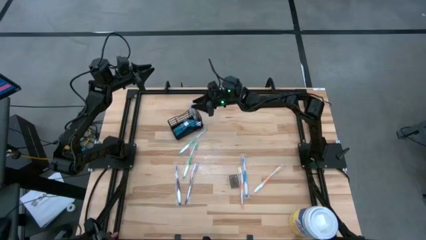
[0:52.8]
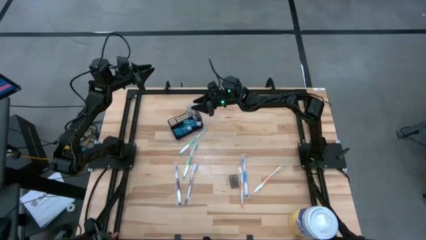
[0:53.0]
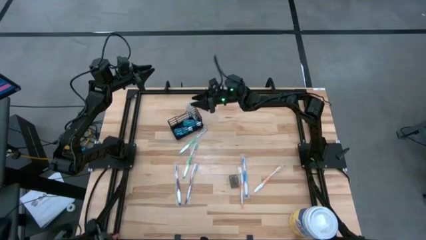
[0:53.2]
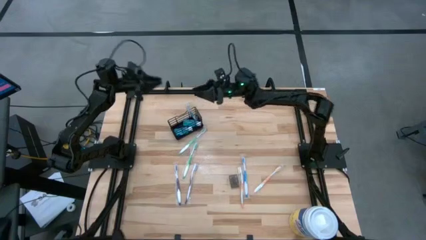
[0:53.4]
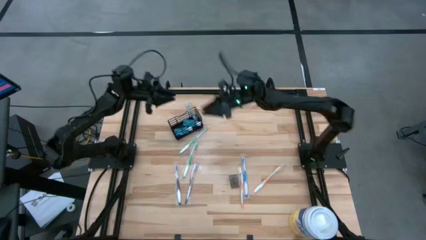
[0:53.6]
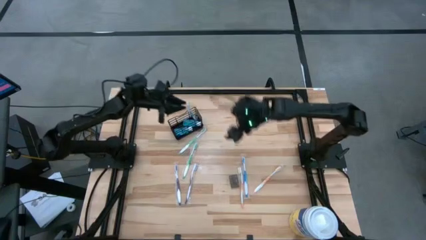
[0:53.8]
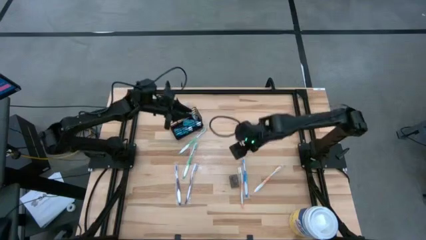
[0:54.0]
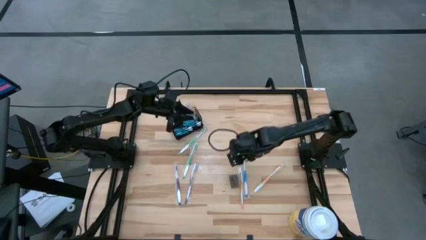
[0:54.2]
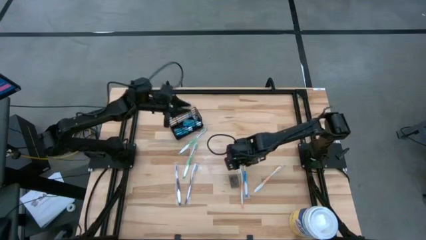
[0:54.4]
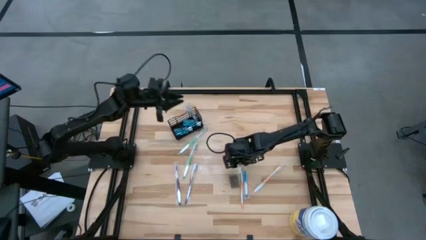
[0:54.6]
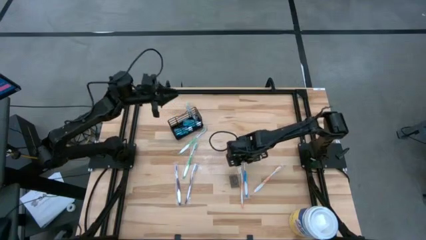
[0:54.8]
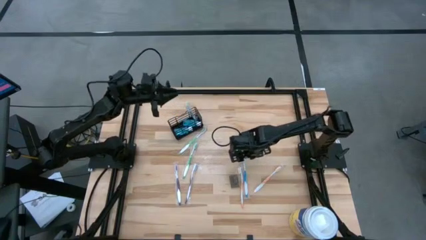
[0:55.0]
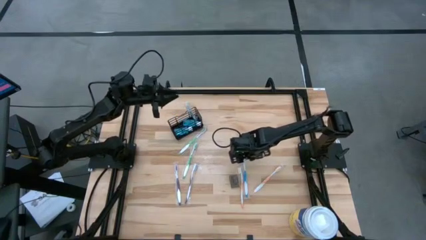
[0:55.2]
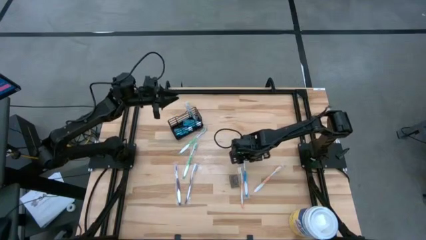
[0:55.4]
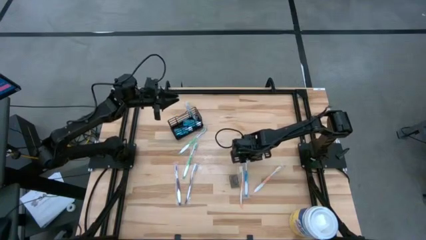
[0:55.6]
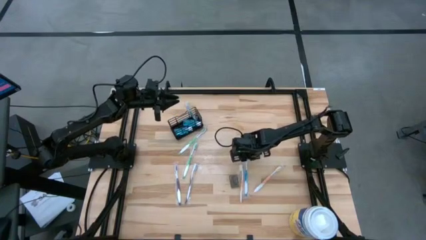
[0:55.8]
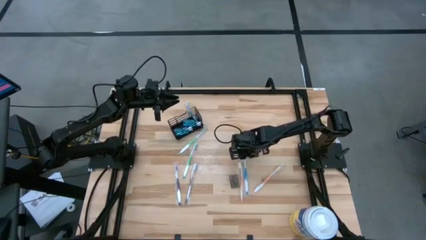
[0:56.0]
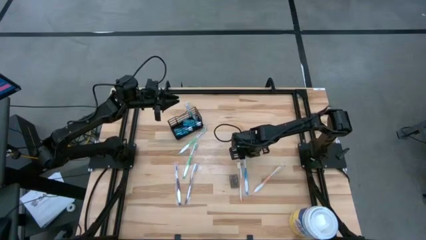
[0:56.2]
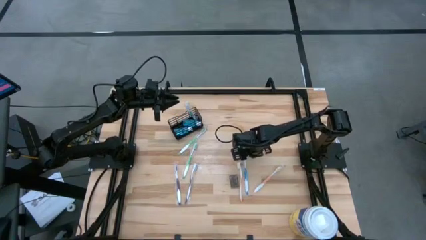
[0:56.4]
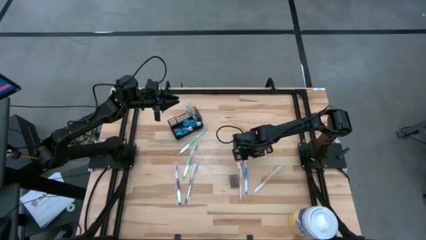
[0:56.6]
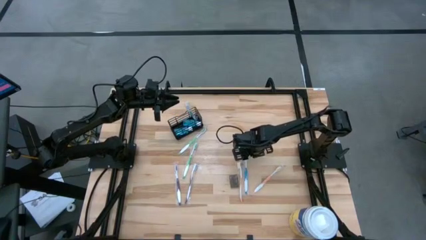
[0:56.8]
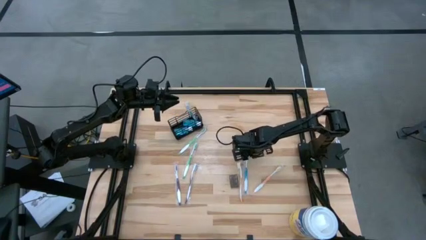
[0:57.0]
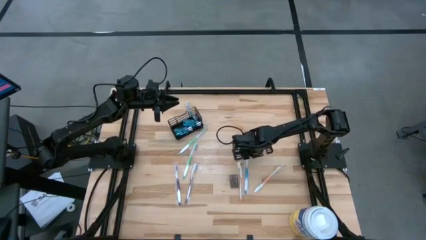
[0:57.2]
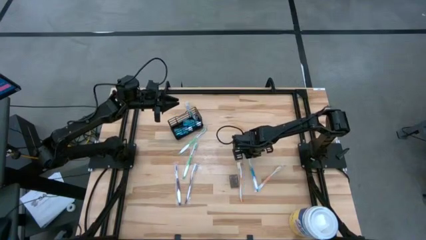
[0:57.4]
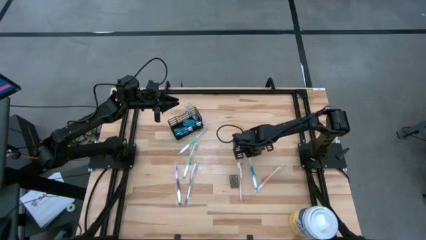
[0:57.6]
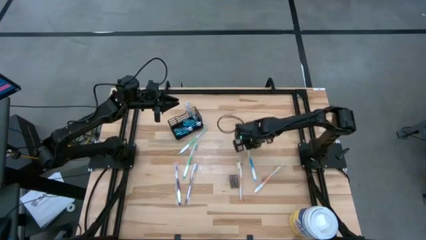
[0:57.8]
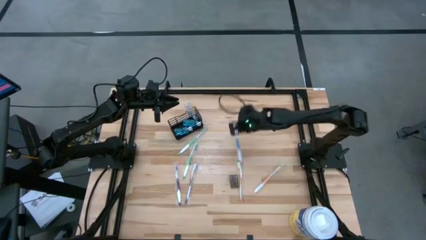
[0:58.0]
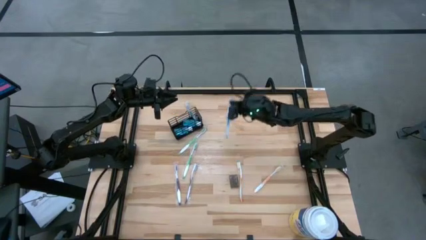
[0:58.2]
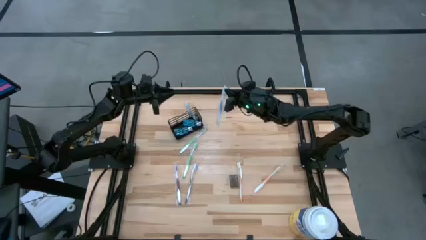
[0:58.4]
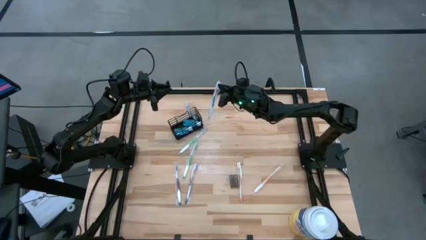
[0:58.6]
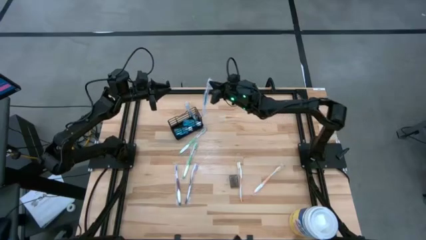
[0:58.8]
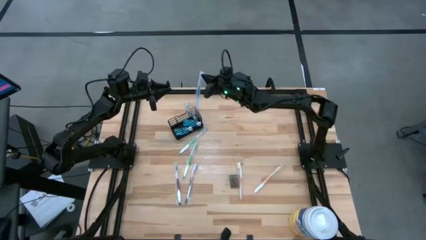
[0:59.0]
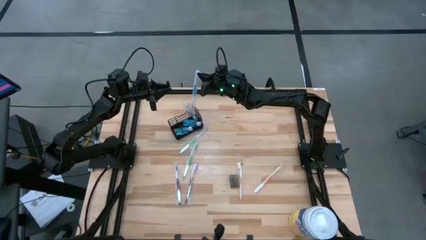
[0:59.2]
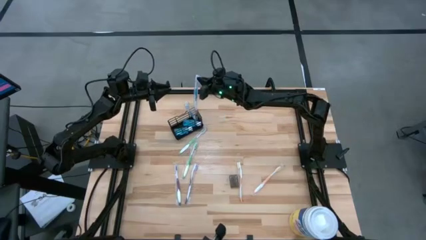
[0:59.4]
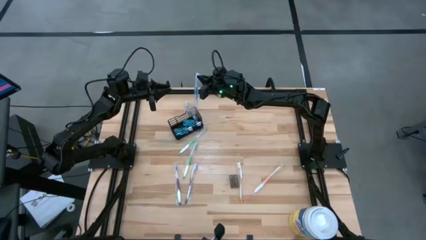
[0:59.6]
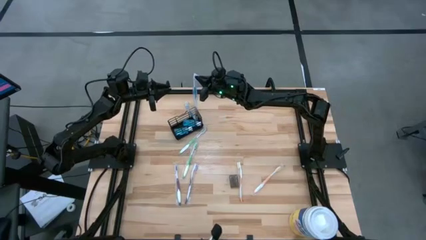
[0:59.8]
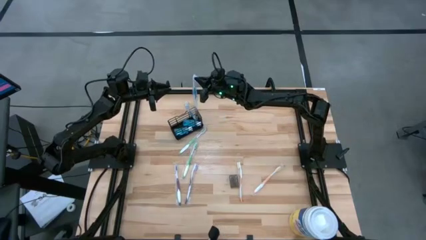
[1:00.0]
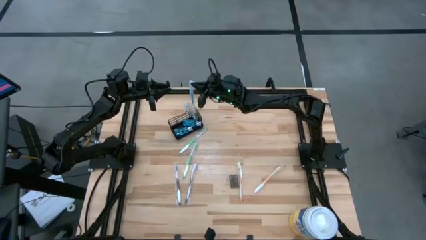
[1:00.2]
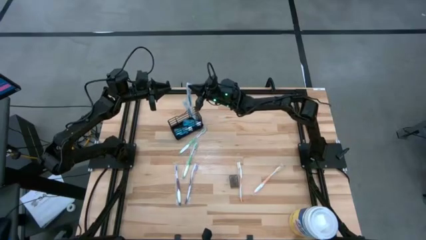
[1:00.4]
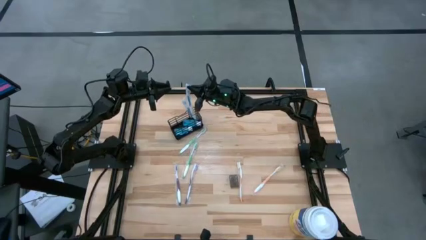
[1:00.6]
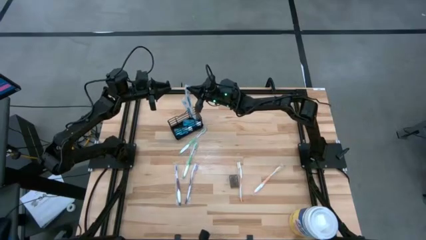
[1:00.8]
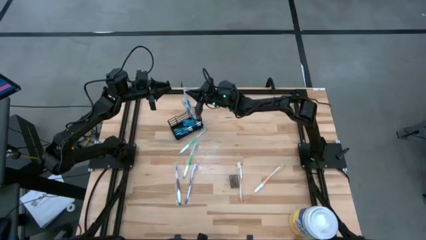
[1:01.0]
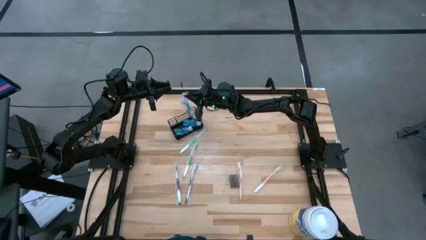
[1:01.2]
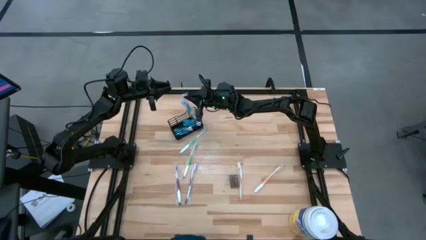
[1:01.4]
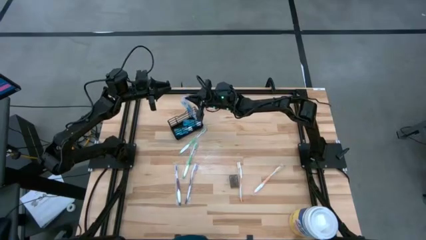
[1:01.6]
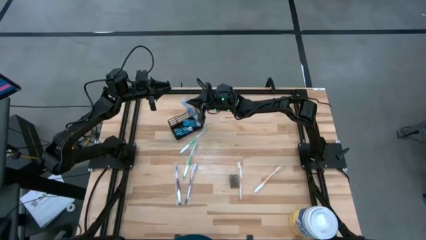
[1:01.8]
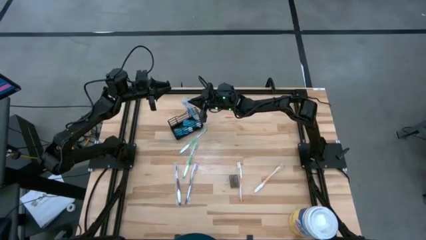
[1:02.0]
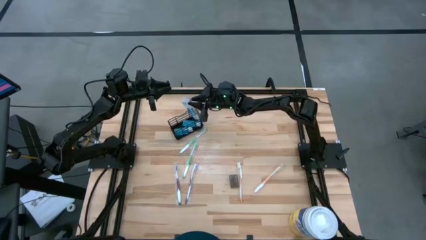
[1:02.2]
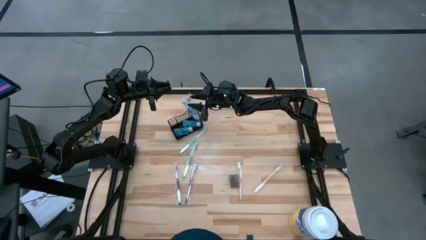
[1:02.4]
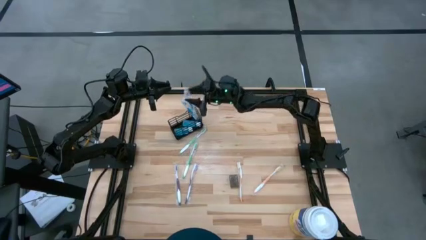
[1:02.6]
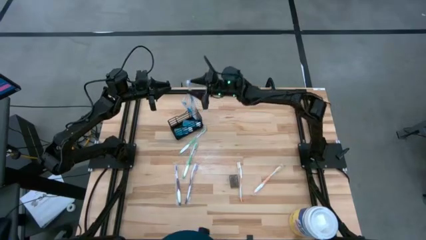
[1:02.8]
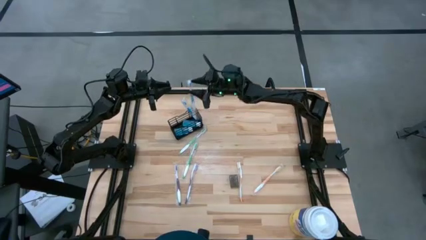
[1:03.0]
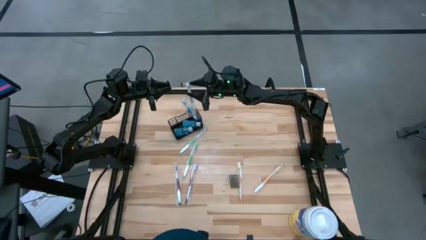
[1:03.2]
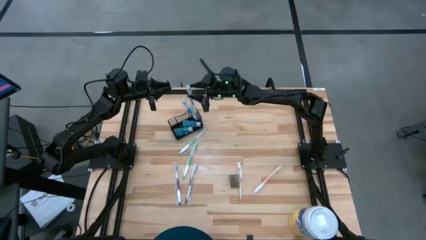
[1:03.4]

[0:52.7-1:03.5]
Task: Pick & Place toothbrushing station
Put the blue toothbrush into the black organizer

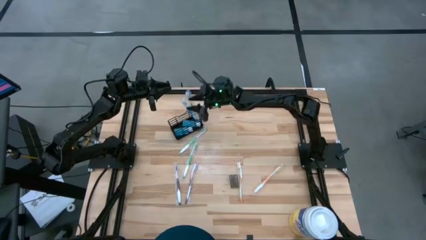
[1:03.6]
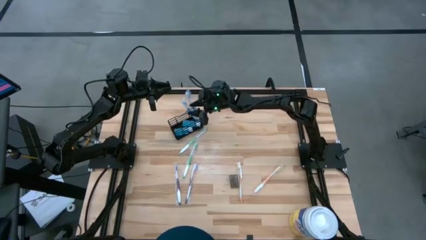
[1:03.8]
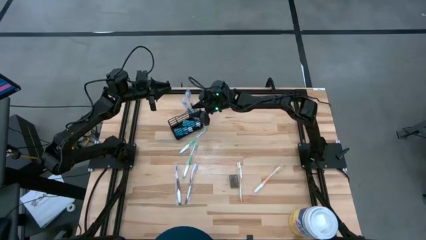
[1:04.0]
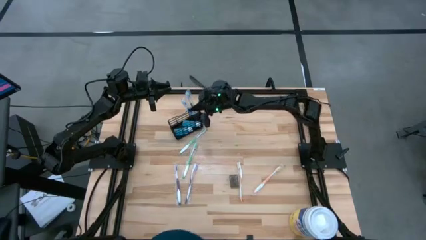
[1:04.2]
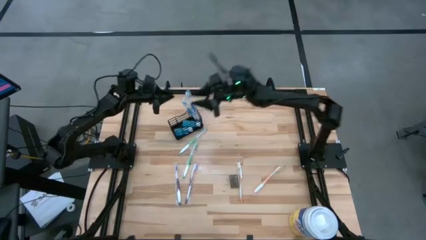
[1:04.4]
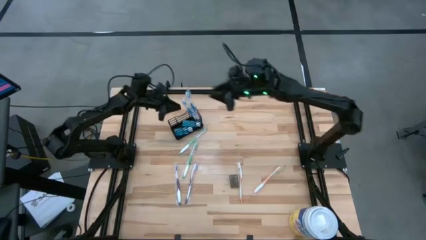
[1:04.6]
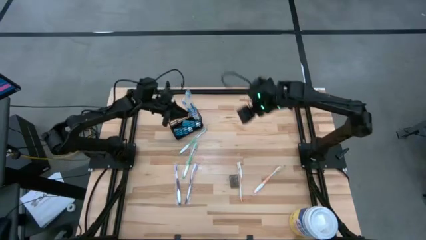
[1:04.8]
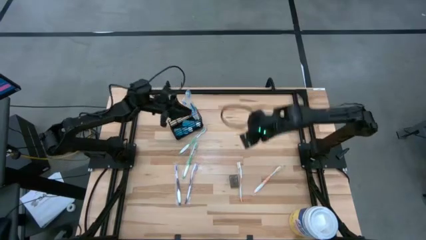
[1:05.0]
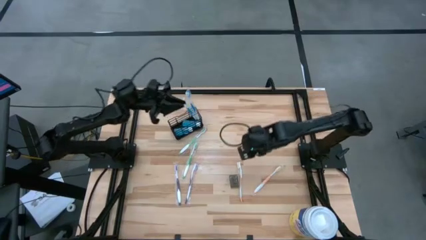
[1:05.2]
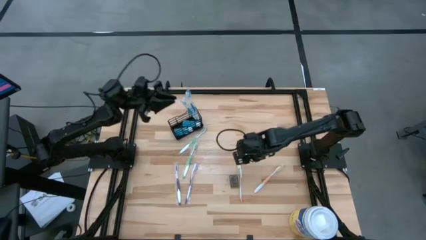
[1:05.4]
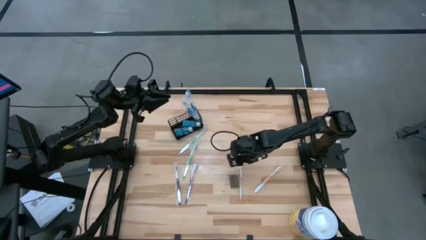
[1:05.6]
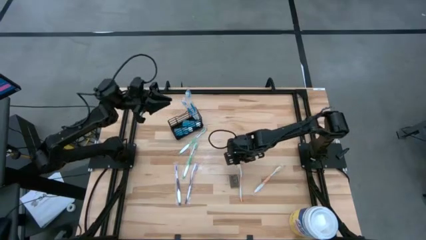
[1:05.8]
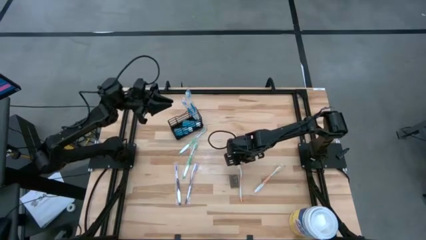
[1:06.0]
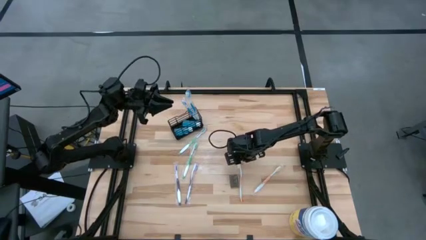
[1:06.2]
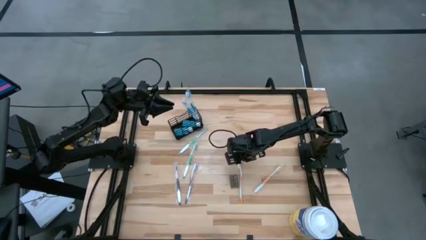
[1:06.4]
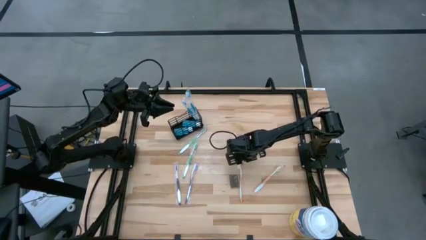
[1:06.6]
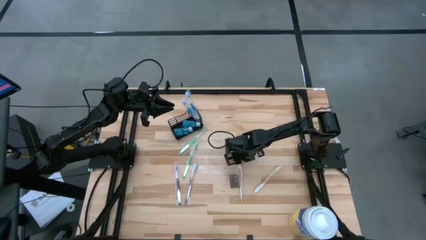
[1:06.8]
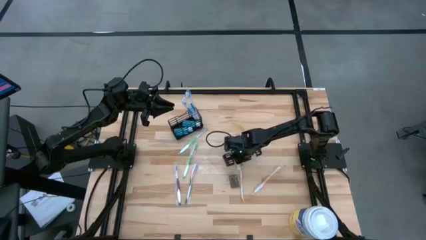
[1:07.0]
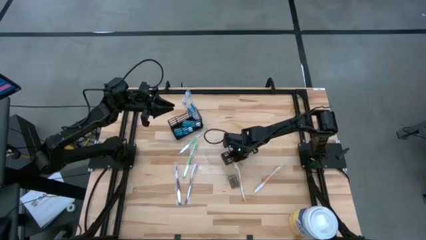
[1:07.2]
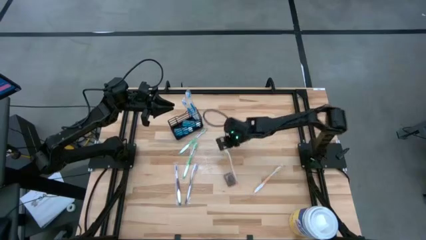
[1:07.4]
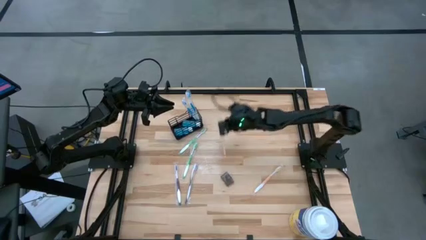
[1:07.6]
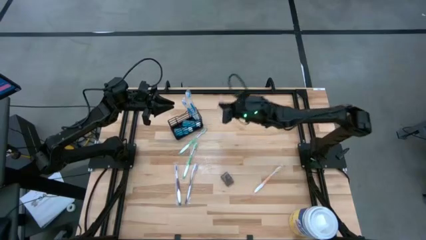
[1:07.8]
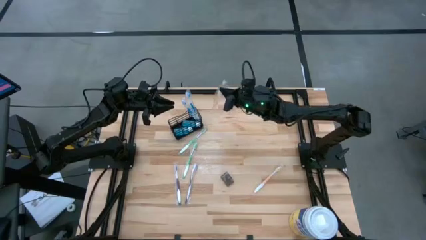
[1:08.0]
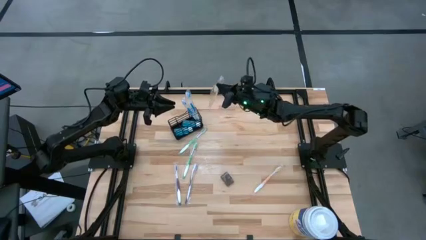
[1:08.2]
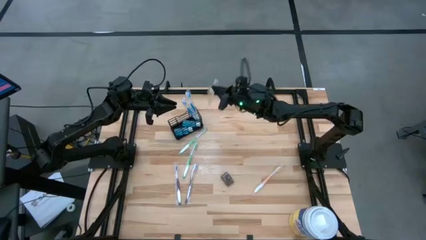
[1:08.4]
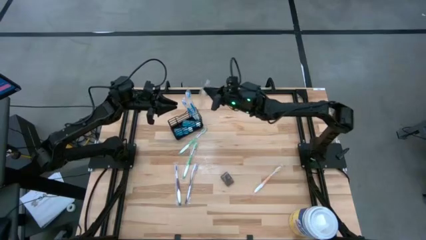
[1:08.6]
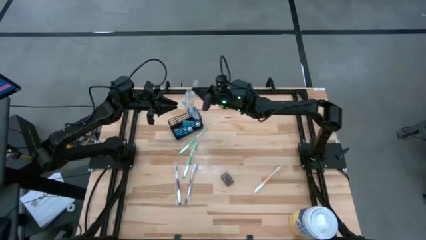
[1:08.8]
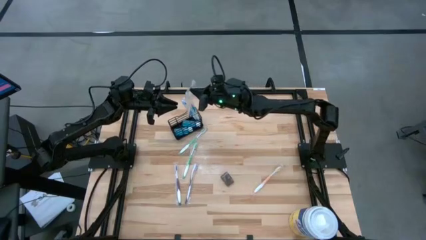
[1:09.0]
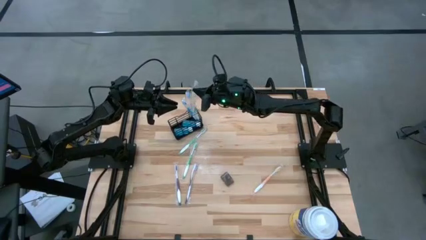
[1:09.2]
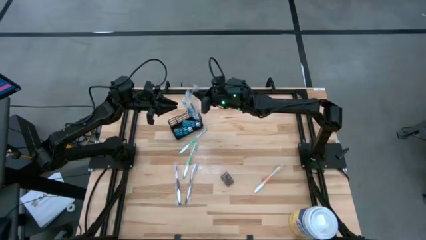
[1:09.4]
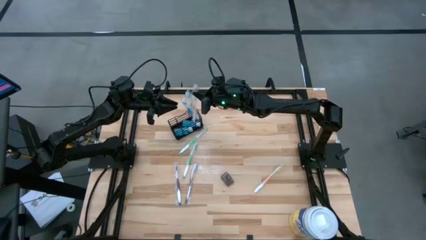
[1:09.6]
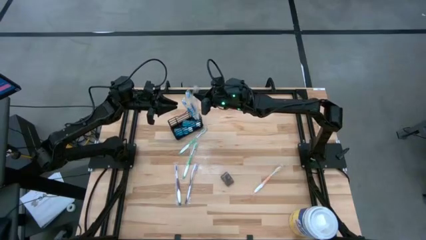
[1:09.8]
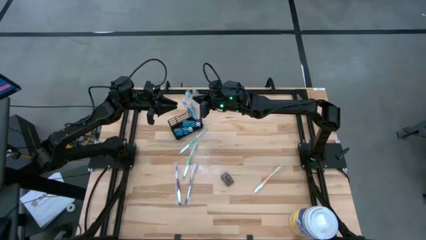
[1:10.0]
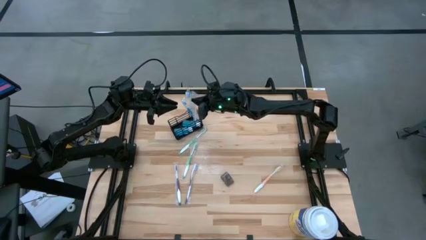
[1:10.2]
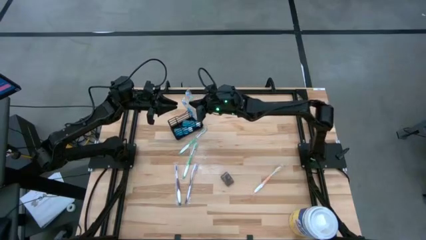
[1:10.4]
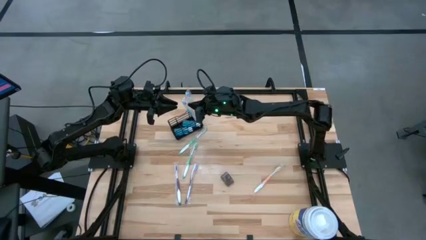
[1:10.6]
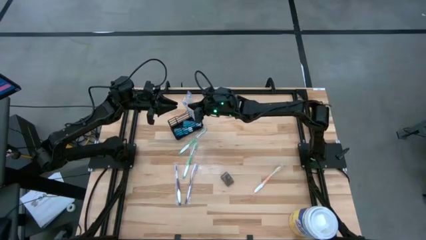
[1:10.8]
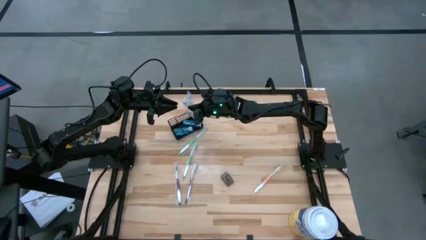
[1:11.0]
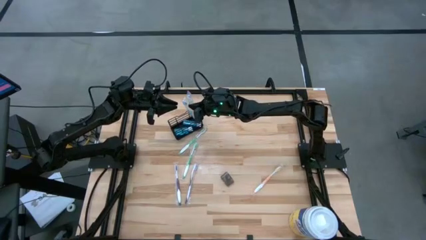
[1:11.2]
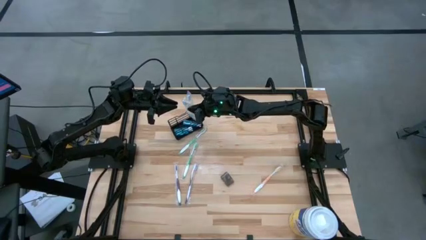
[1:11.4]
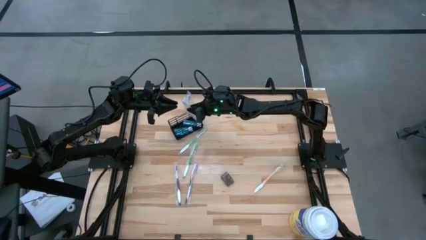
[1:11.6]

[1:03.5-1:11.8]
Put the orange toothbrush into the black organizer
